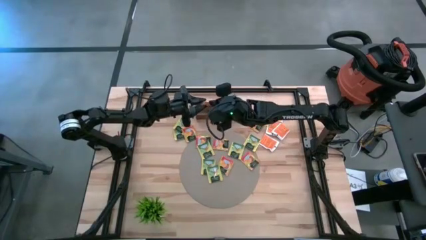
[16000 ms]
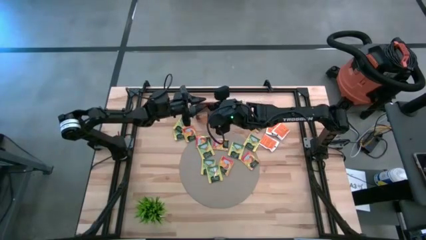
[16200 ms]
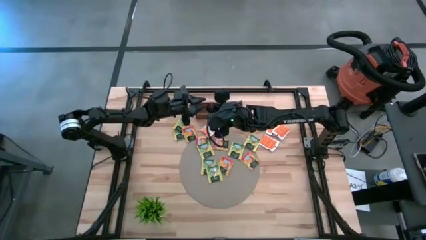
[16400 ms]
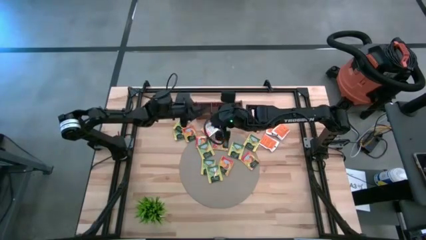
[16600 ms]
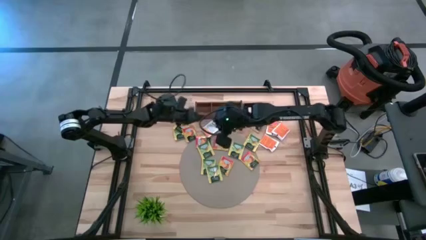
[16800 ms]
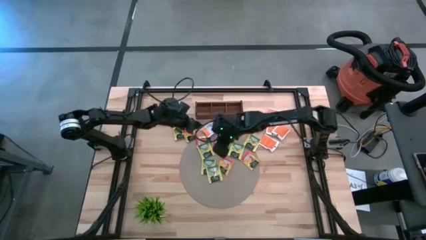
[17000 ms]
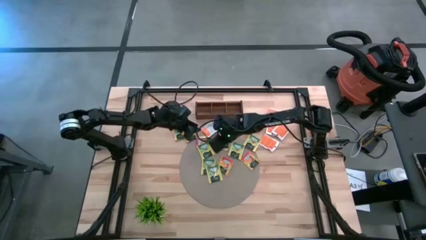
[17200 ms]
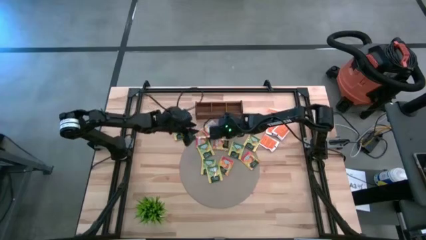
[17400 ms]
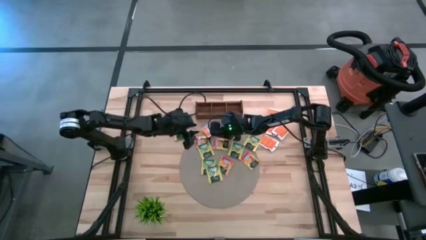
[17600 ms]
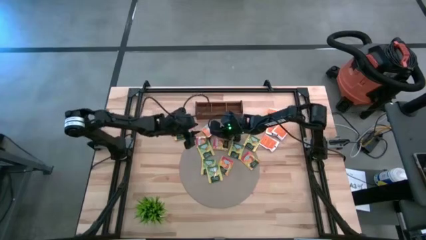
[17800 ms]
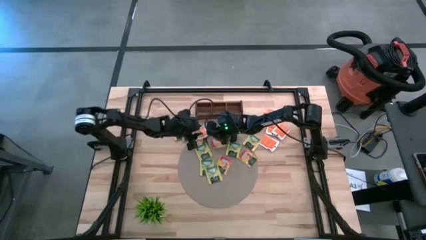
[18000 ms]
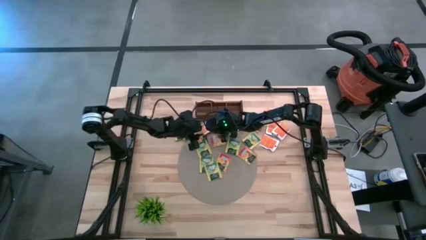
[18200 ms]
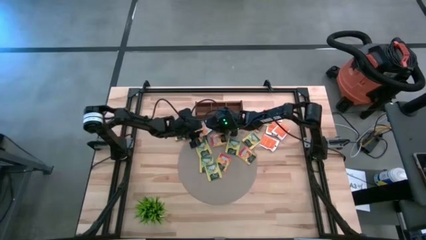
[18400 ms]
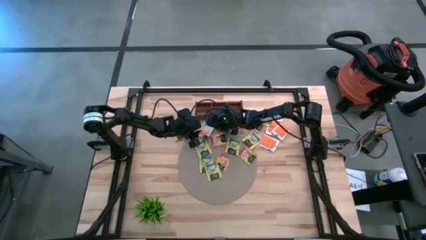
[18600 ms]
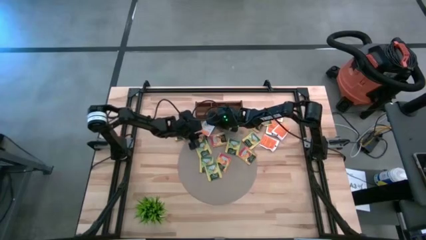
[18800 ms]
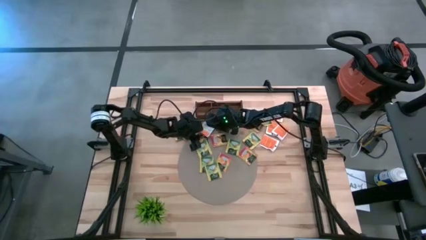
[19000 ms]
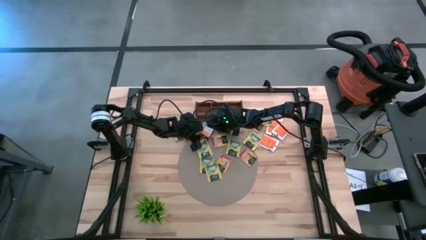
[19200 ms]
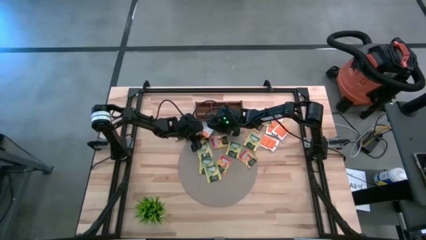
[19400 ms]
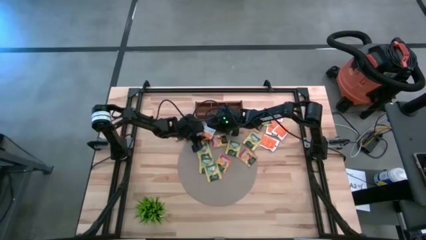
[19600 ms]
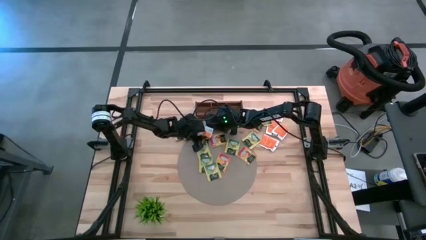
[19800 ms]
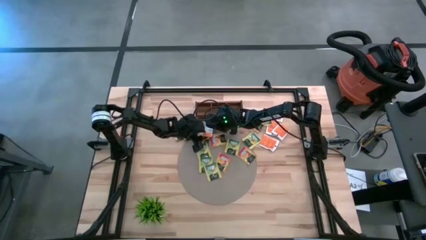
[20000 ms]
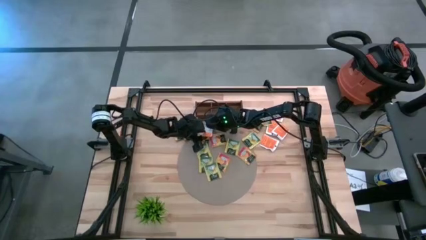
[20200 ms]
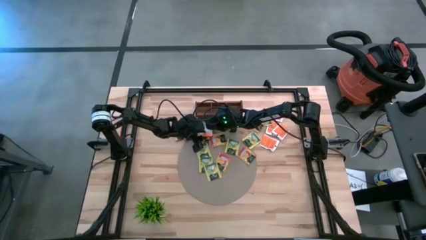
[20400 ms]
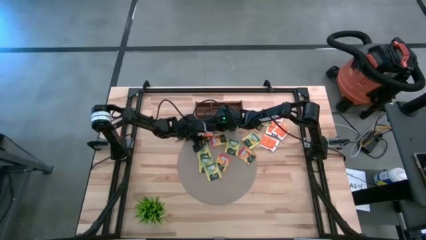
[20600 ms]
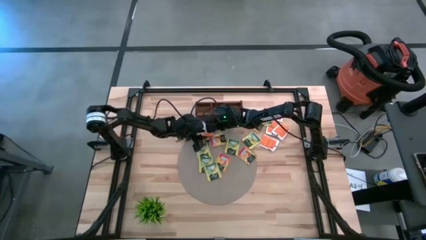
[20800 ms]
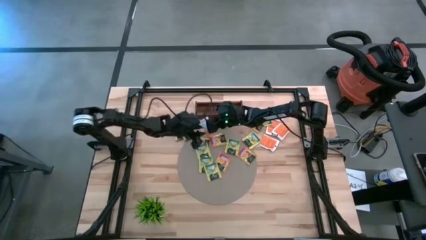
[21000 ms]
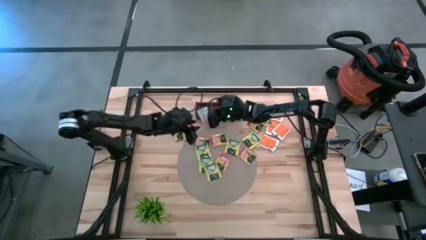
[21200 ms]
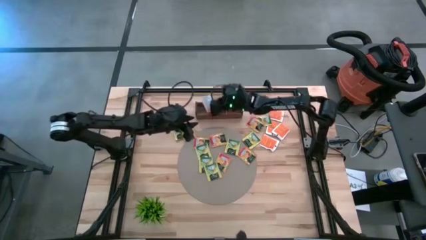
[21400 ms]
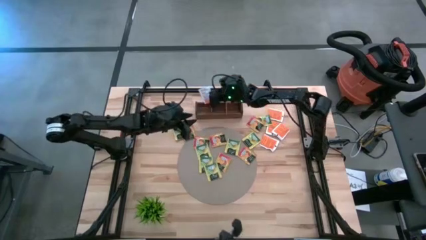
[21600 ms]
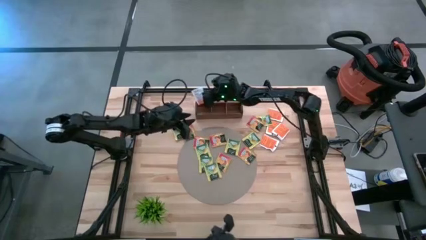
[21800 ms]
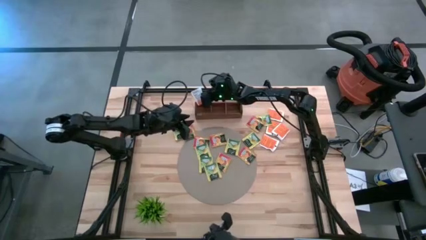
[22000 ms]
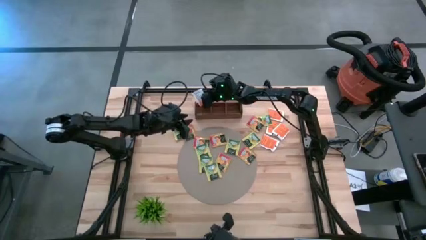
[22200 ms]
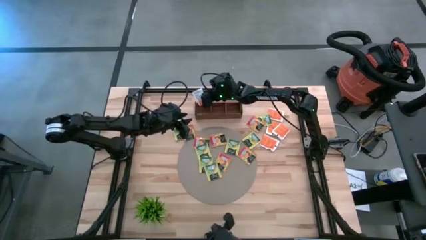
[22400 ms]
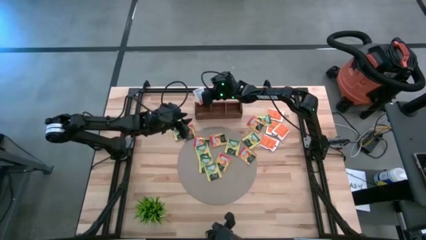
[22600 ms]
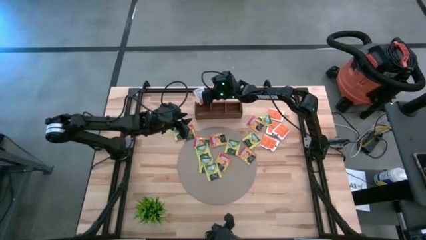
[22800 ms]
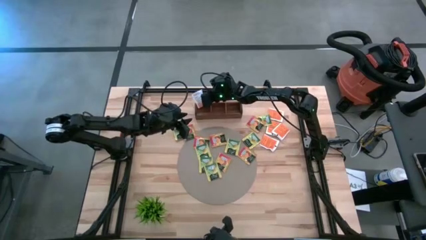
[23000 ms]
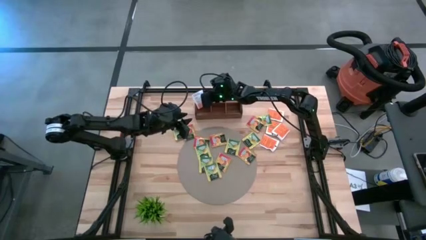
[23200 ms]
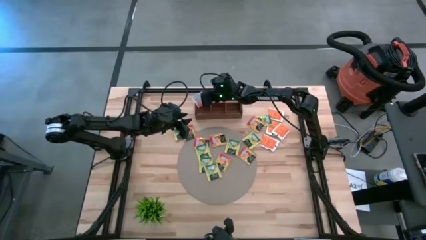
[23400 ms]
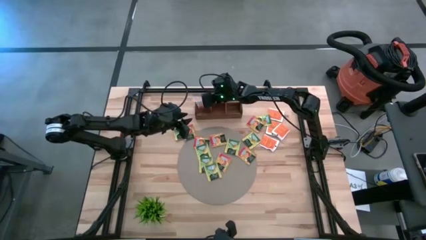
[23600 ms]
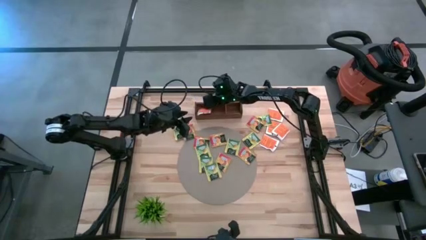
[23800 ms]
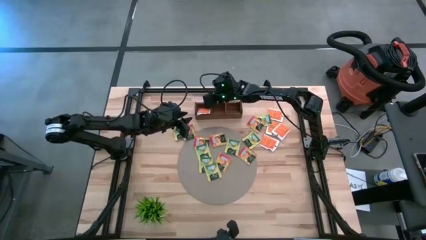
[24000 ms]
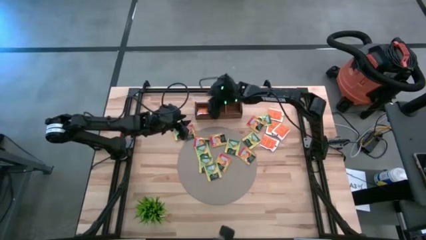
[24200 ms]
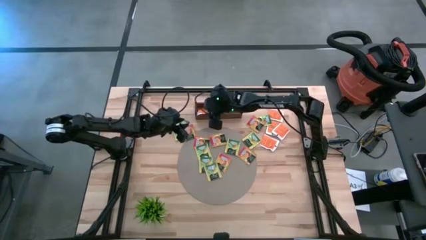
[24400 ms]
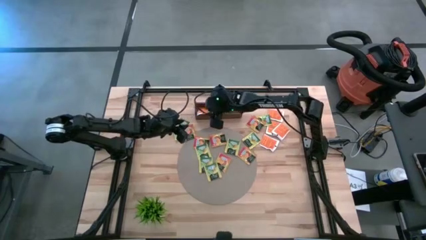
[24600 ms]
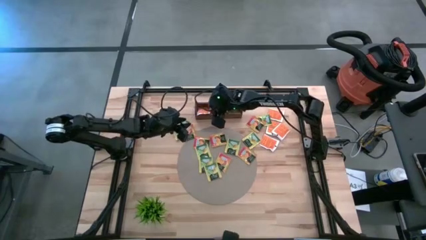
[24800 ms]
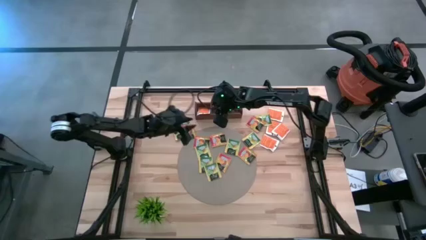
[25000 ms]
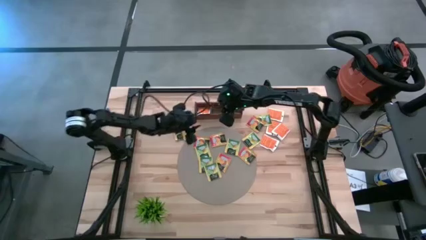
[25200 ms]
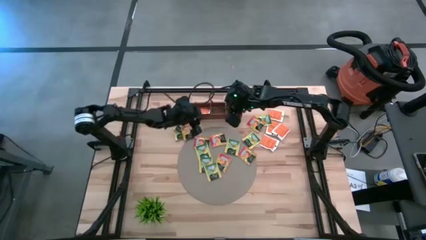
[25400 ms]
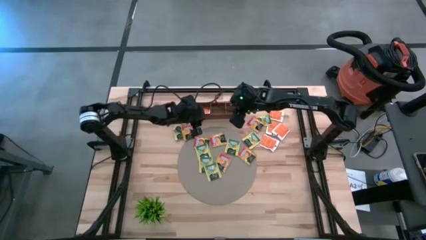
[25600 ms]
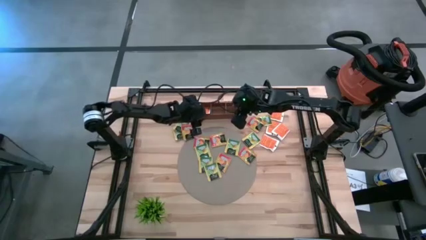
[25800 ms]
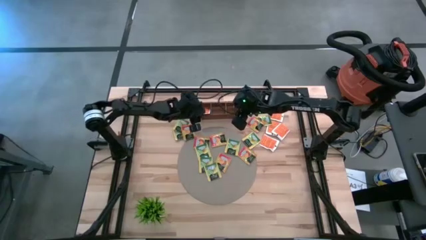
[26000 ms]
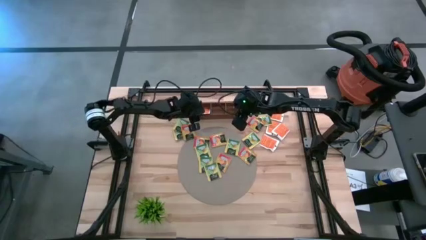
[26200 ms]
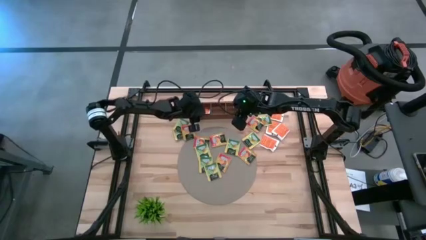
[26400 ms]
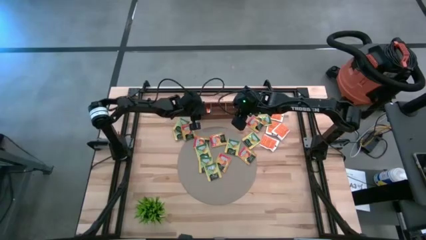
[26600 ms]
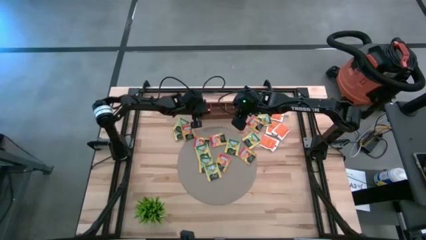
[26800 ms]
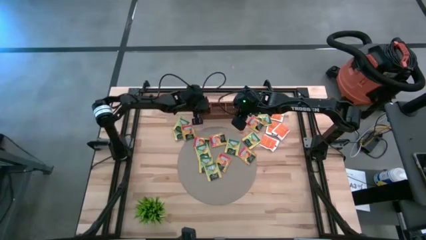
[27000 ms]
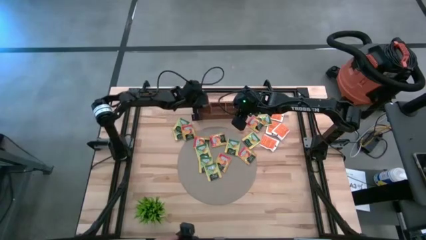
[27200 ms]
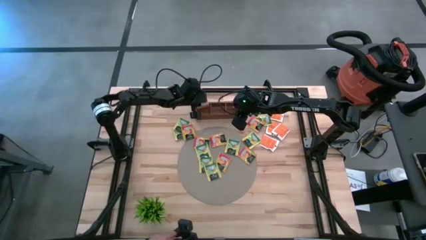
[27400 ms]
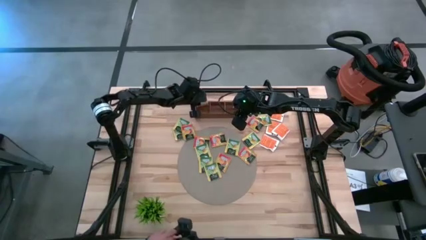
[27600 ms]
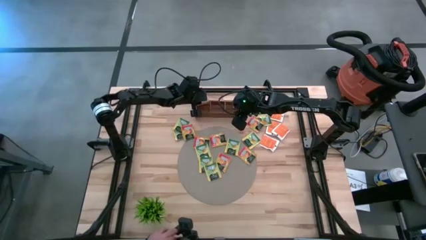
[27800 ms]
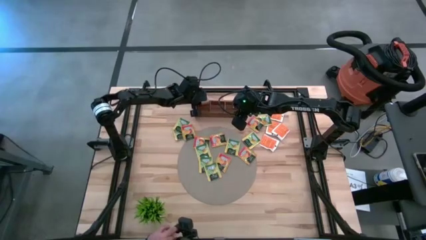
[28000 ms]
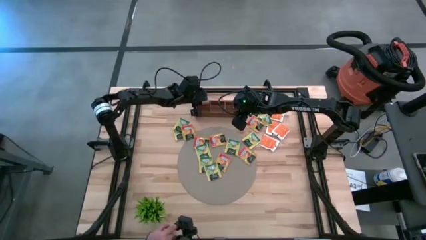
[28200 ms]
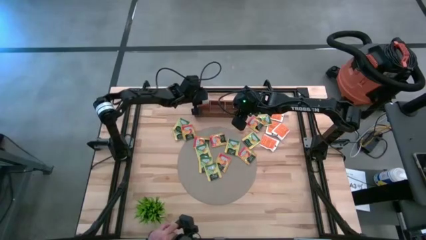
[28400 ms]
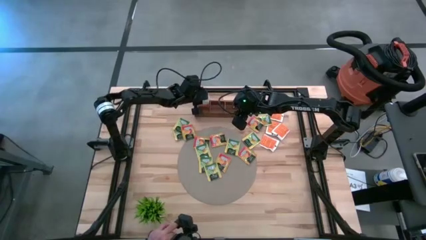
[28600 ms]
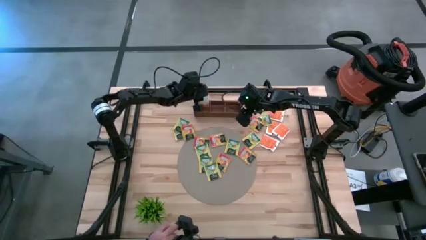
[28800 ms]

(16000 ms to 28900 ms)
Task: Pick & Place Tea
Put the white tea bag into the left section of the wooden organizer
